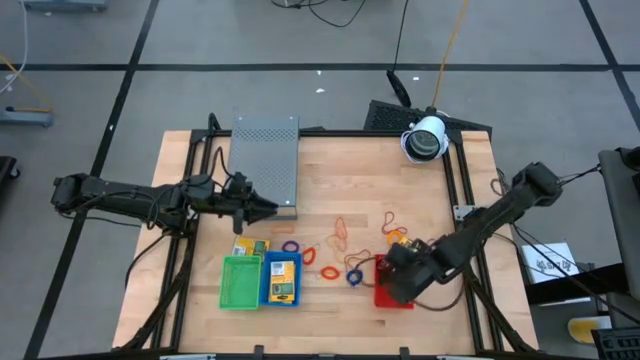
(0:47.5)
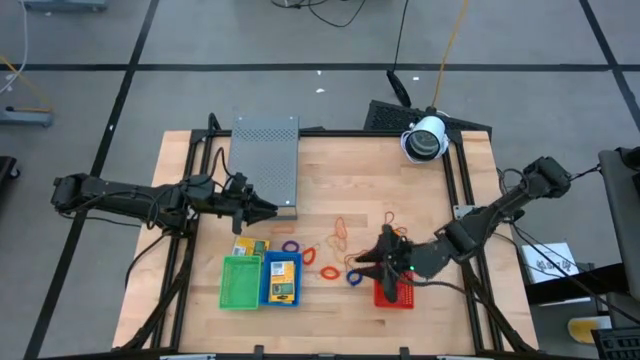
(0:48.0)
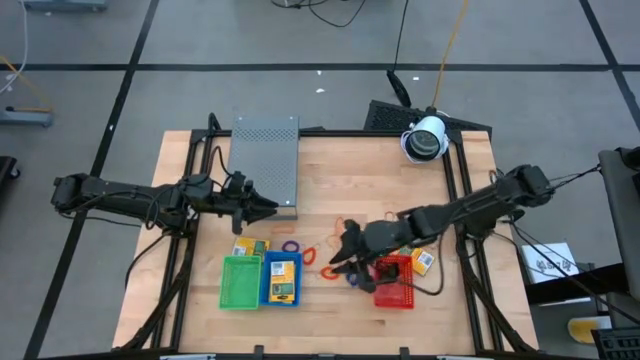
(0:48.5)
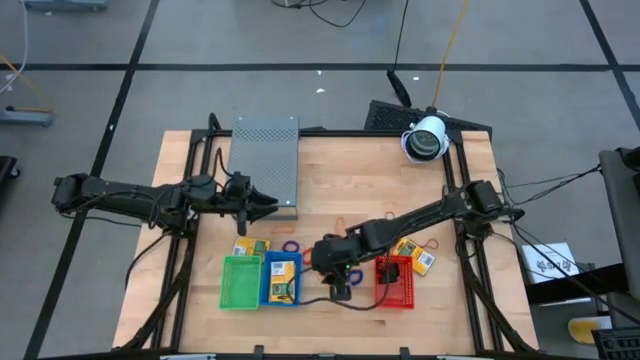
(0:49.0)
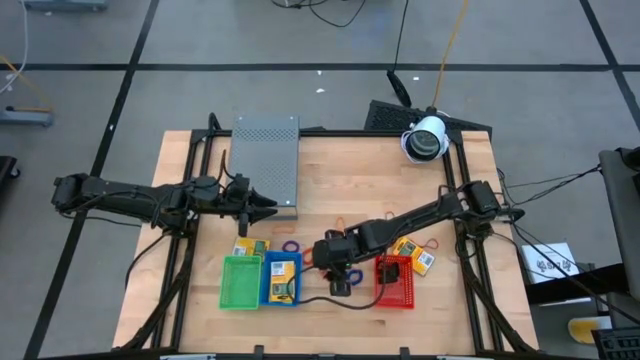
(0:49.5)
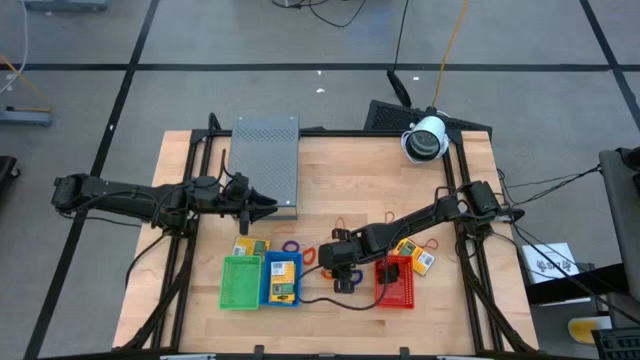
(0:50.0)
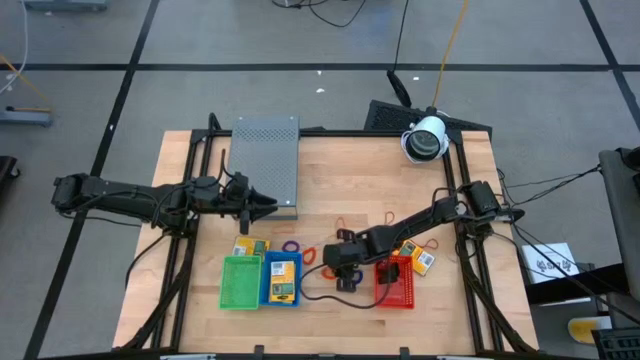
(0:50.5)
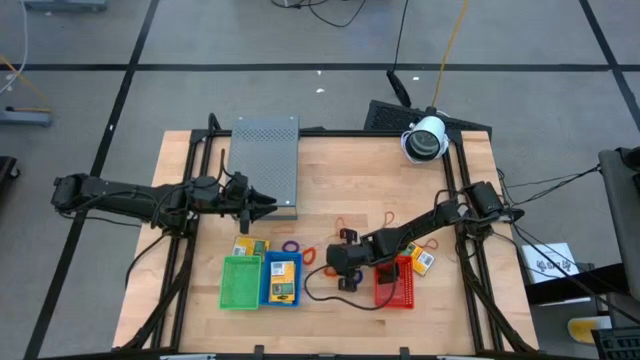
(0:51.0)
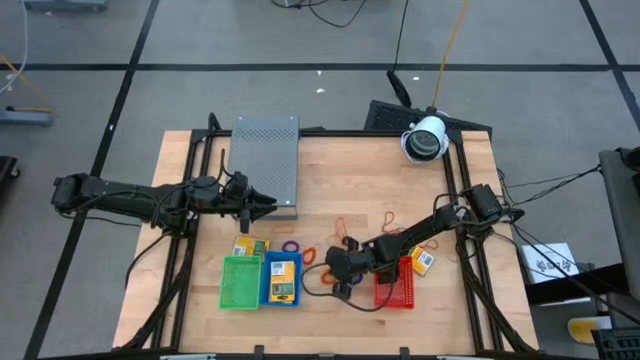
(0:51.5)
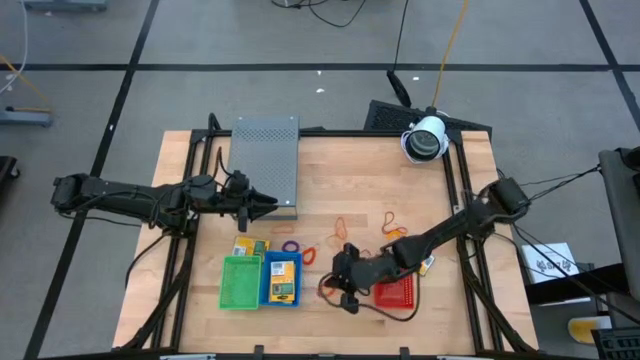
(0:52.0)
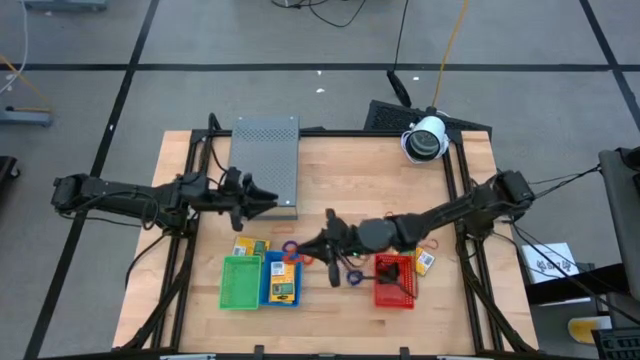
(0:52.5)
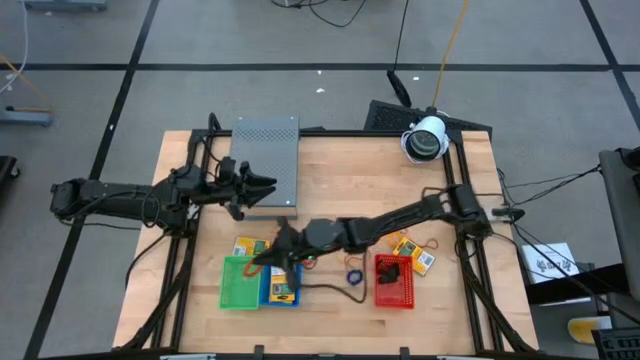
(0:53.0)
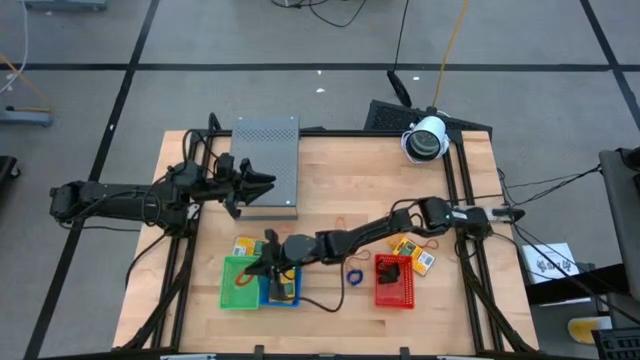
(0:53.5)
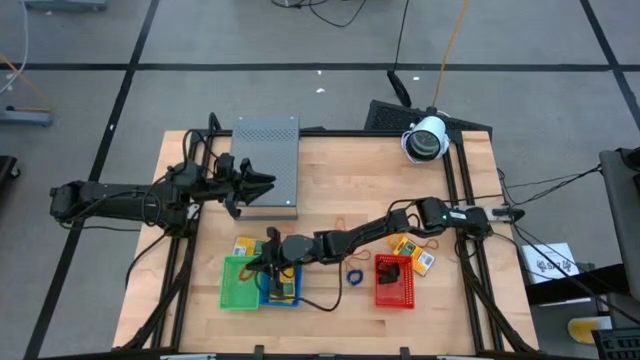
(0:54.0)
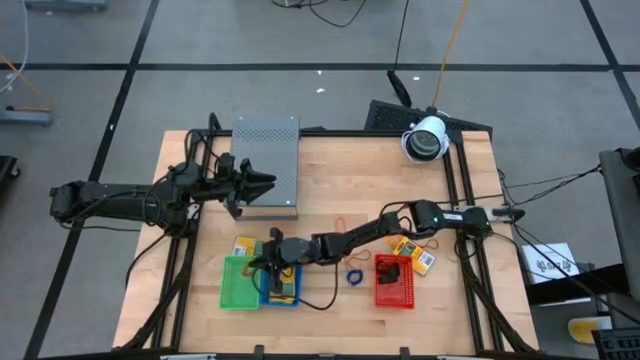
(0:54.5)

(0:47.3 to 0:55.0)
Task: Pick & Place Office Desk Supplies
Put the orange spring rubberband into the green bin

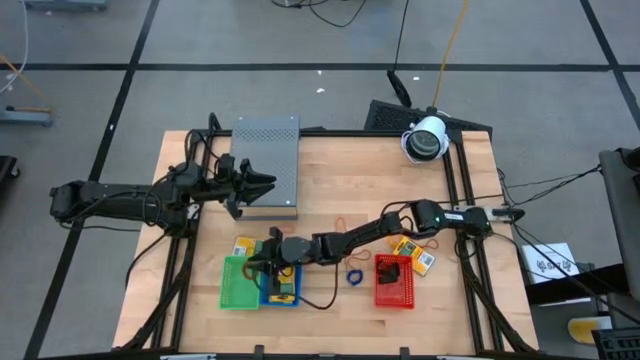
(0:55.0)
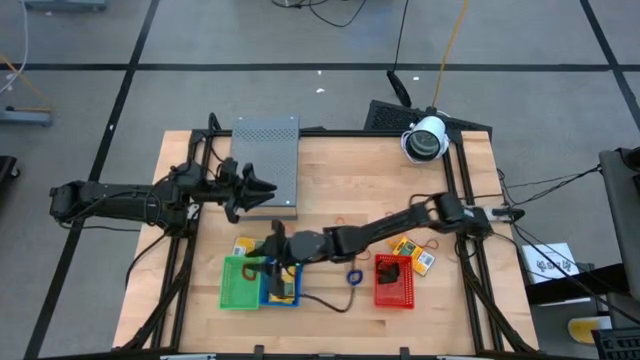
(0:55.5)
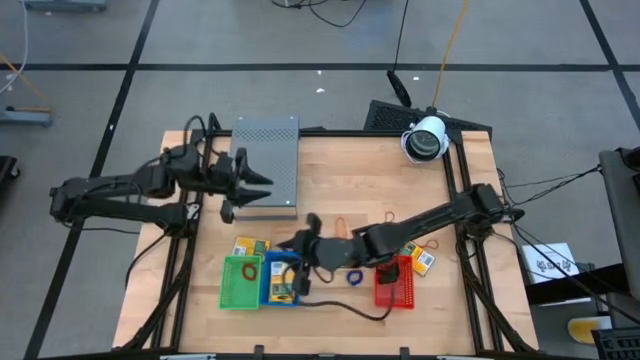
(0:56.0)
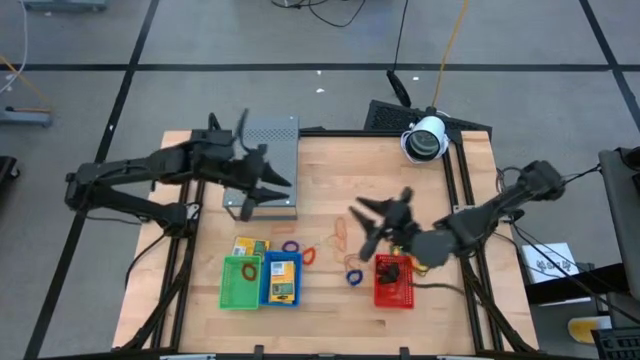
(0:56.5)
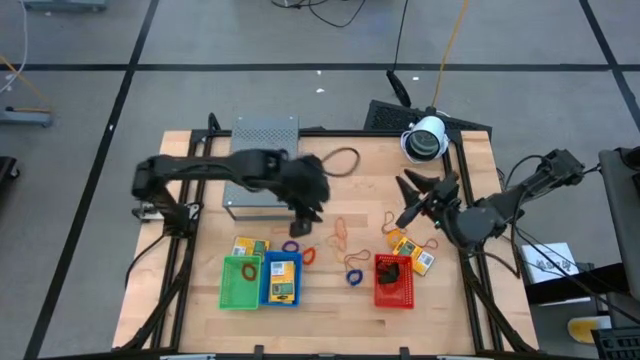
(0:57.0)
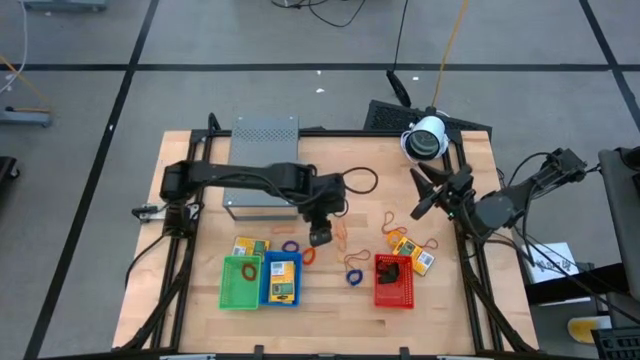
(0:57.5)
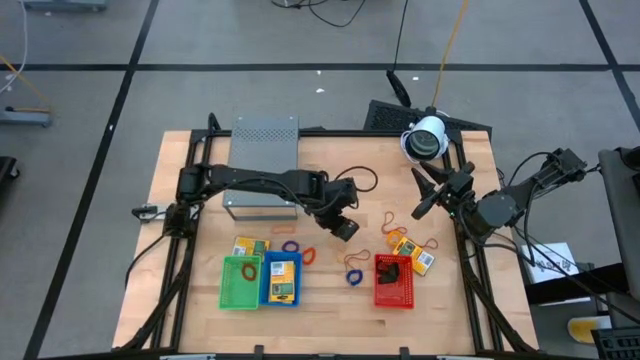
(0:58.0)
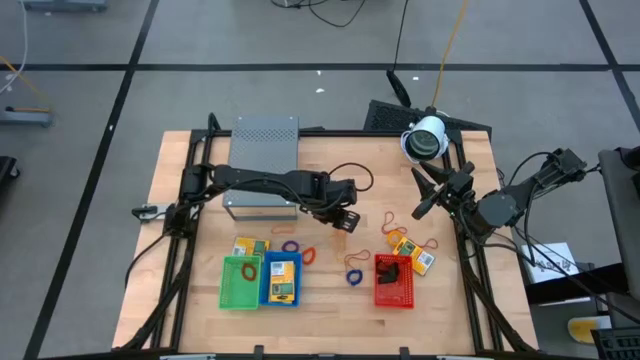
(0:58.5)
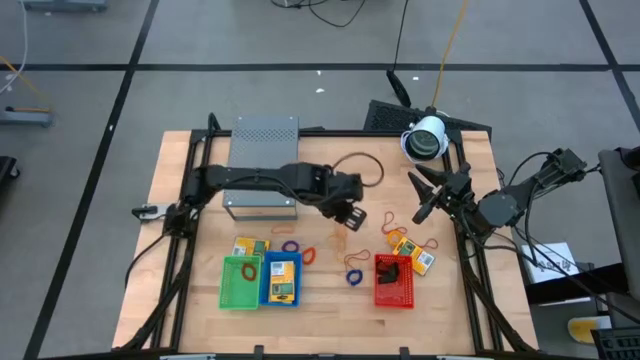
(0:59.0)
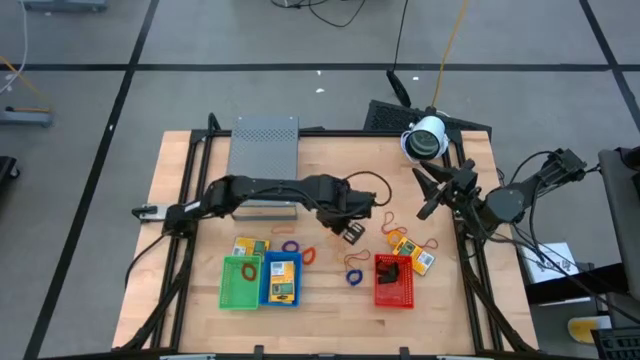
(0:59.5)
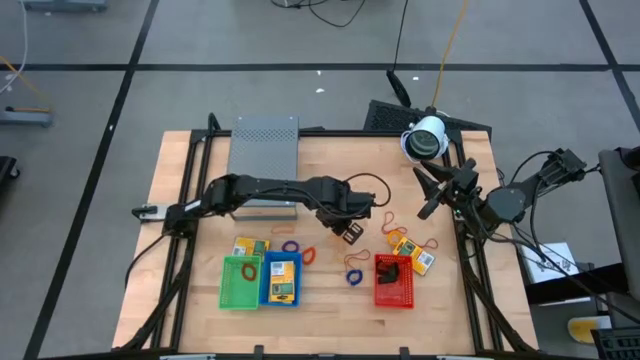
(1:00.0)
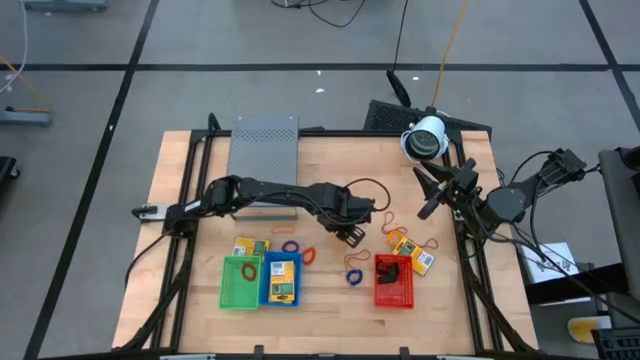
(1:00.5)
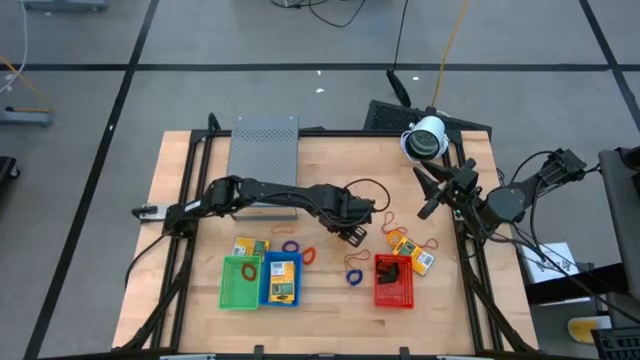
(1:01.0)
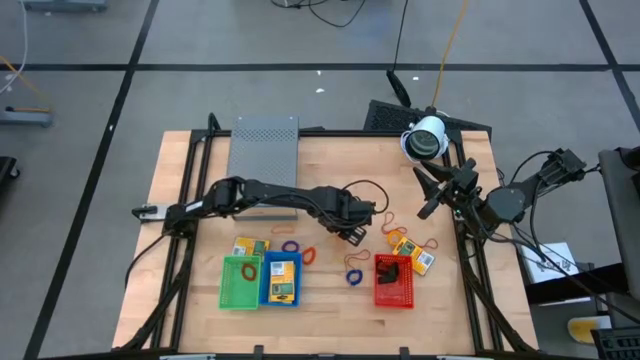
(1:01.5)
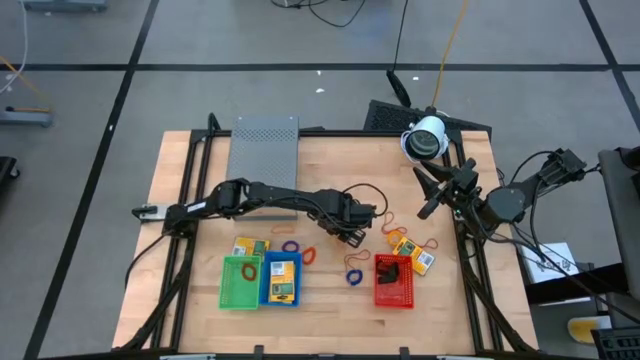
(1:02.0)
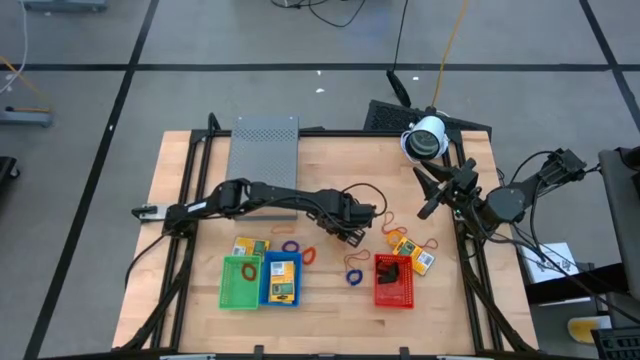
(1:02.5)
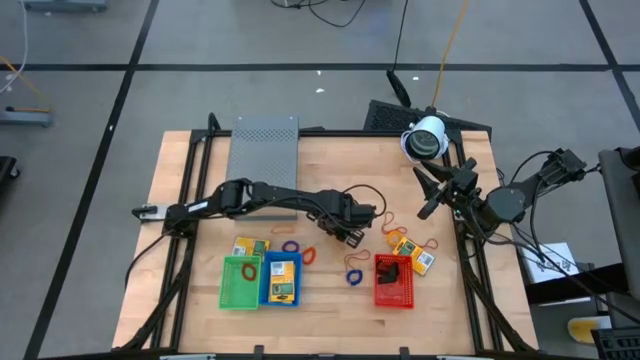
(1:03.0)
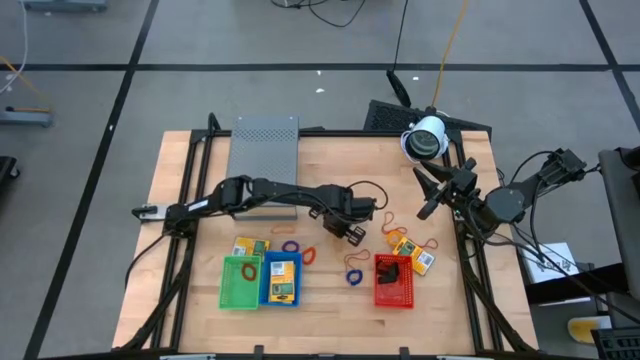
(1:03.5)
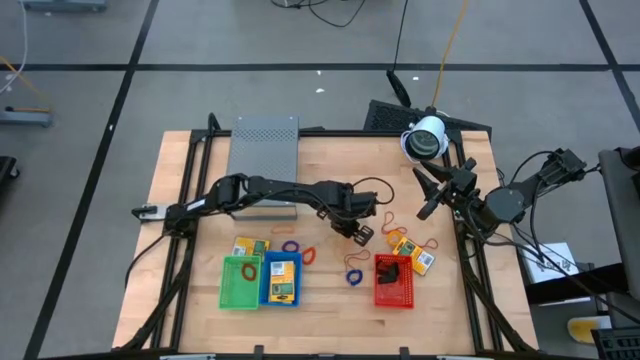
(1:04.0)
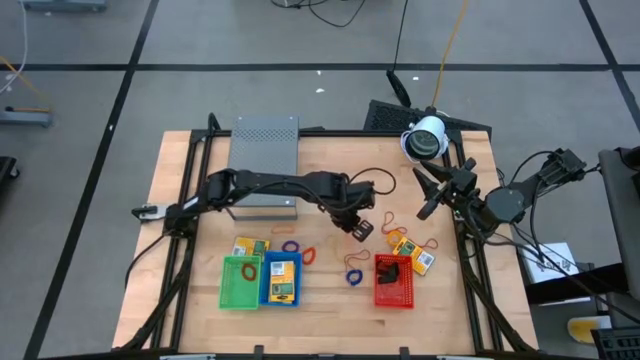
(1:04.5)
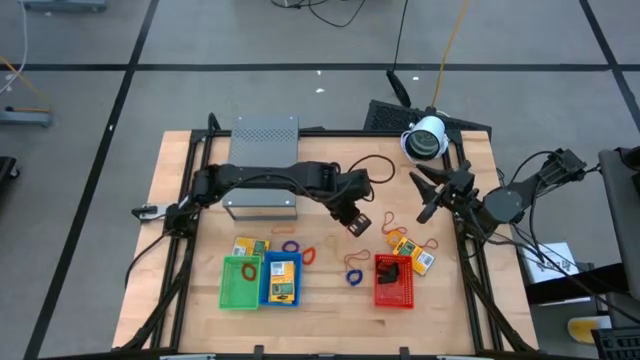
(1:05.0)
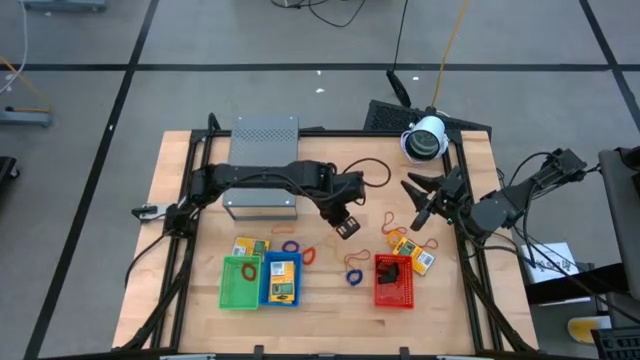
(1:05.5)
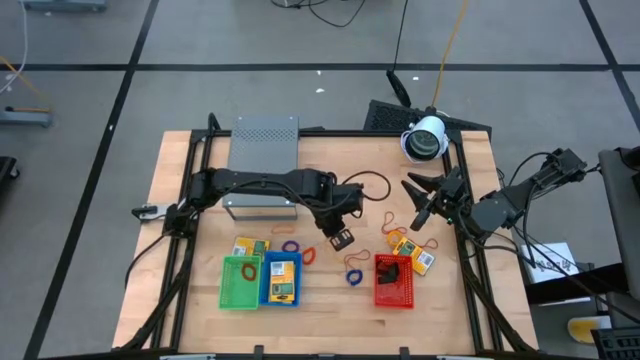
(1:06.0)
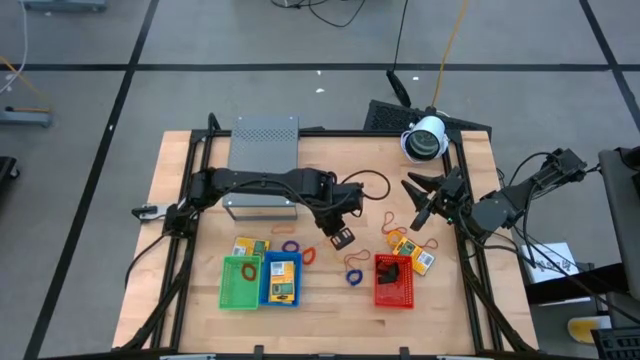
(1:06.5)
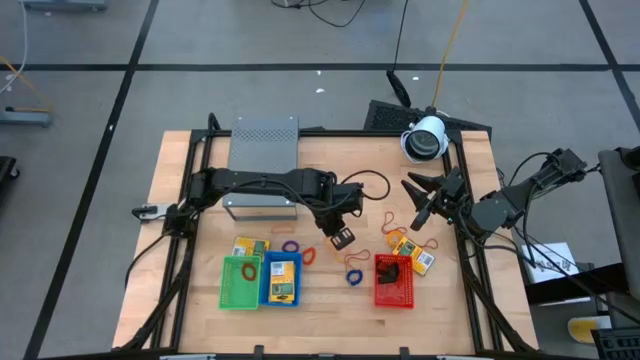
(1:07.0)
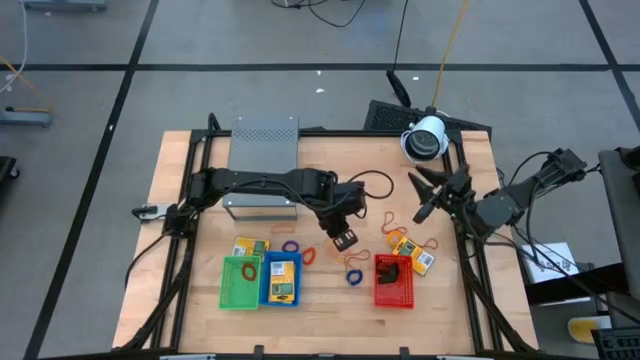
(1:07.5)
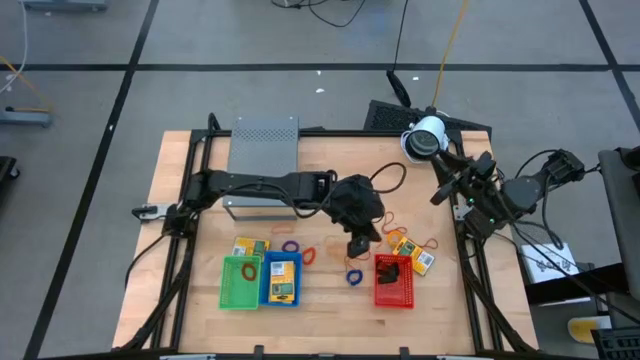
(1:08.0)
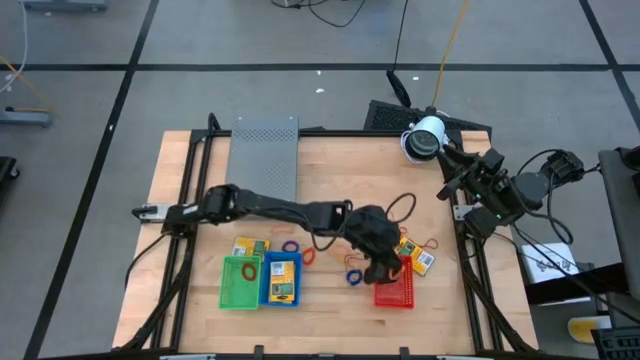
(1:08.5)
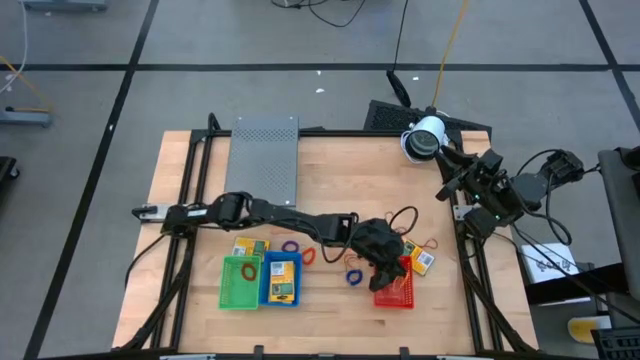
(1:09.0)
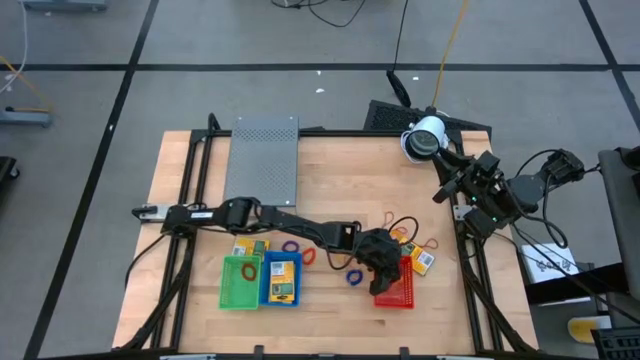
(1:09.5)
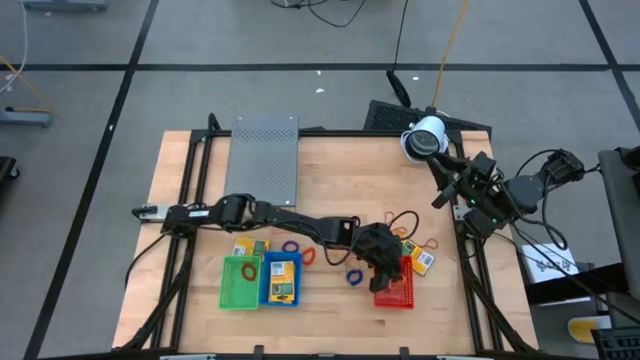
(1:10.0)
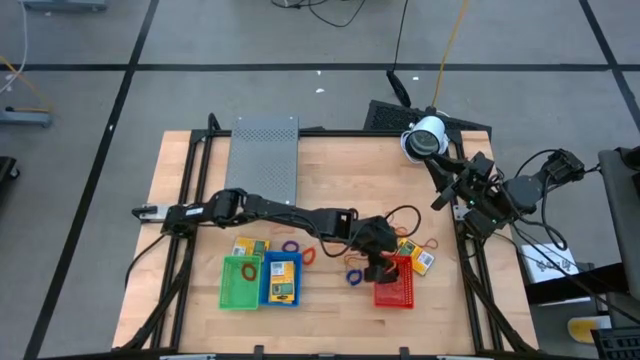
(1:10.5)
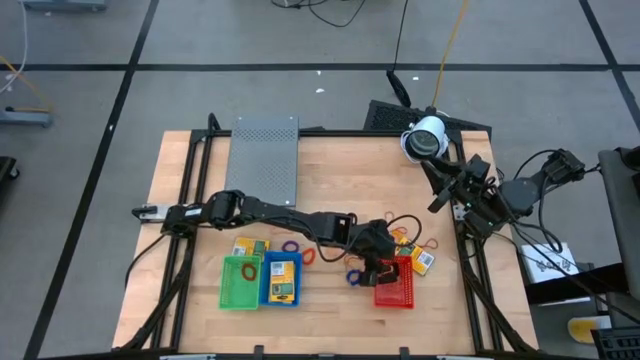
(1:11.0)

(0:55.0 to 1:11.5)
Put the orange rubber band into the red bin
